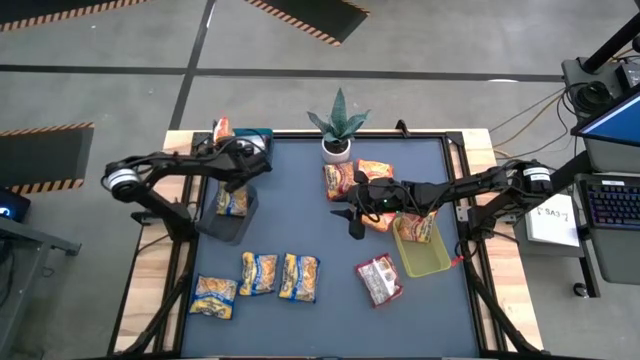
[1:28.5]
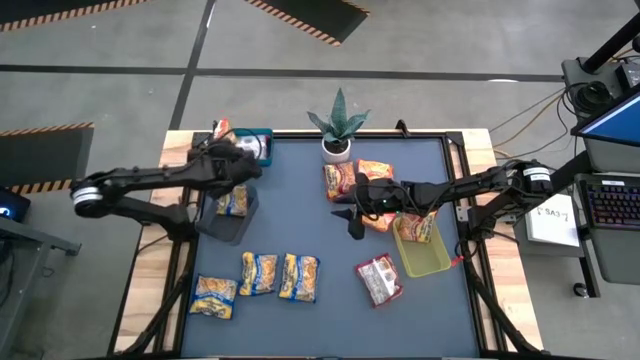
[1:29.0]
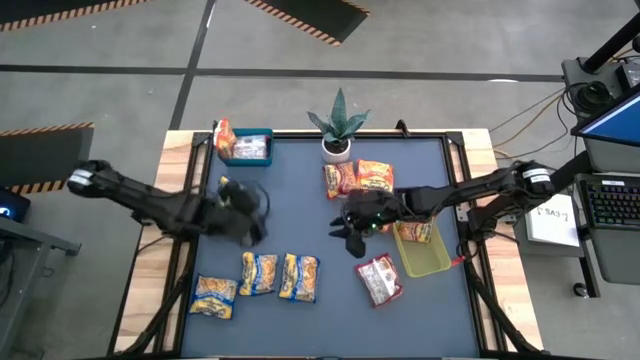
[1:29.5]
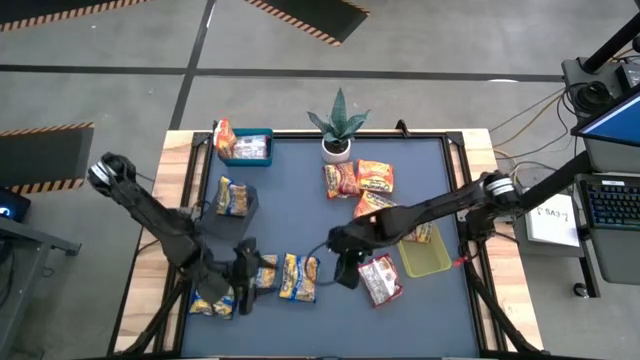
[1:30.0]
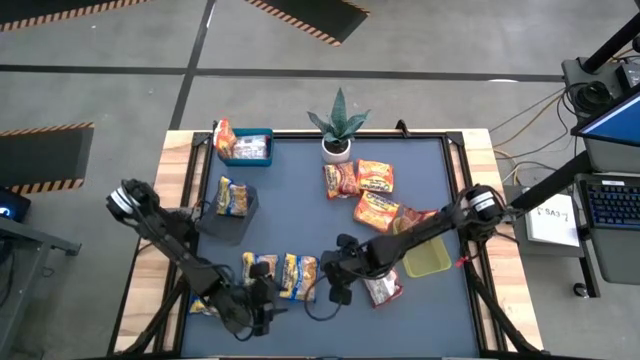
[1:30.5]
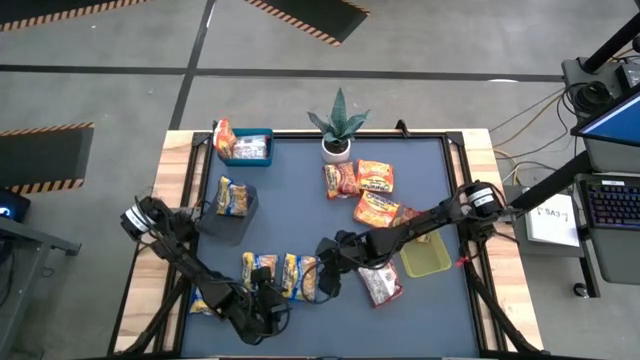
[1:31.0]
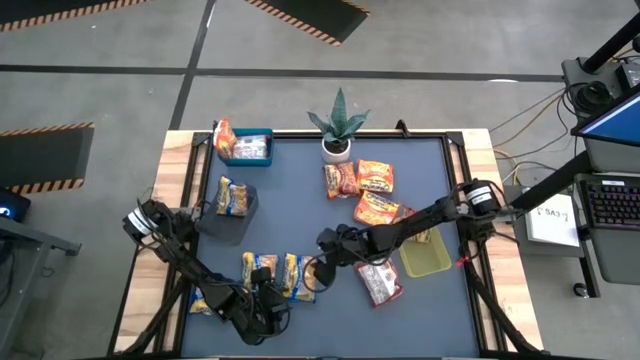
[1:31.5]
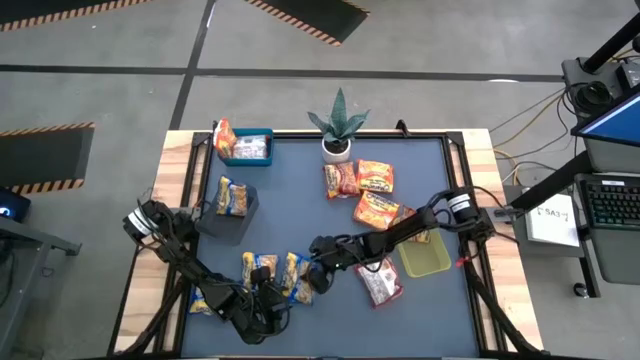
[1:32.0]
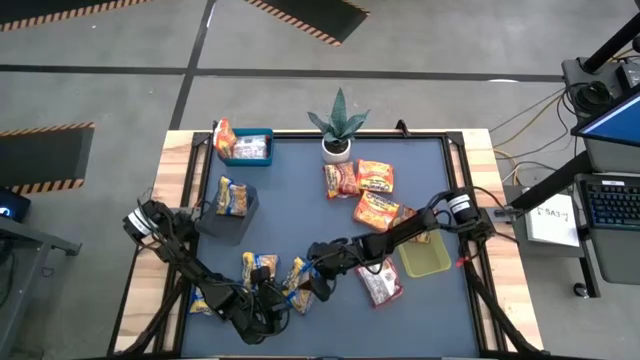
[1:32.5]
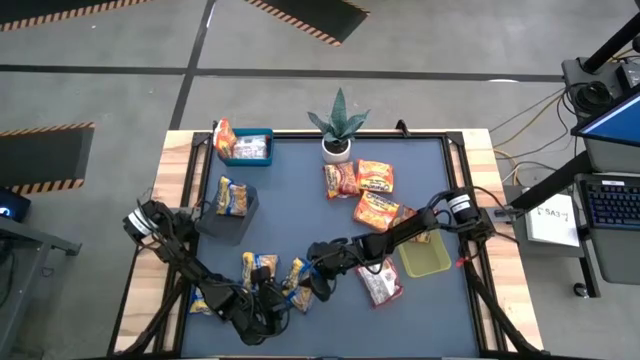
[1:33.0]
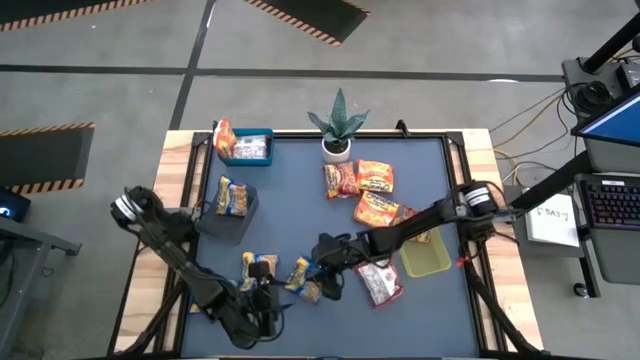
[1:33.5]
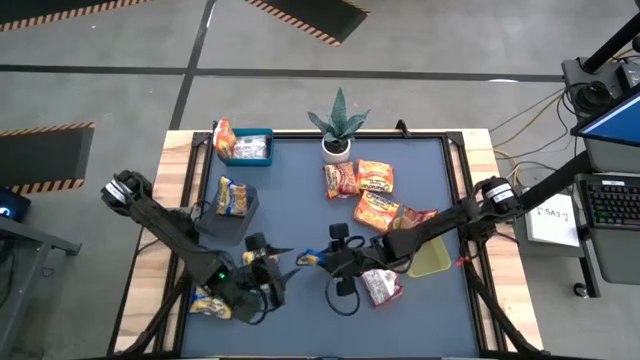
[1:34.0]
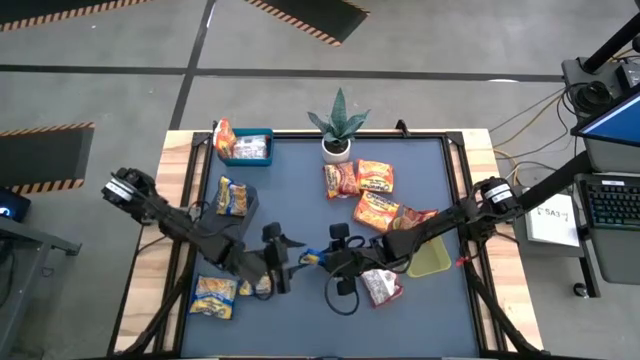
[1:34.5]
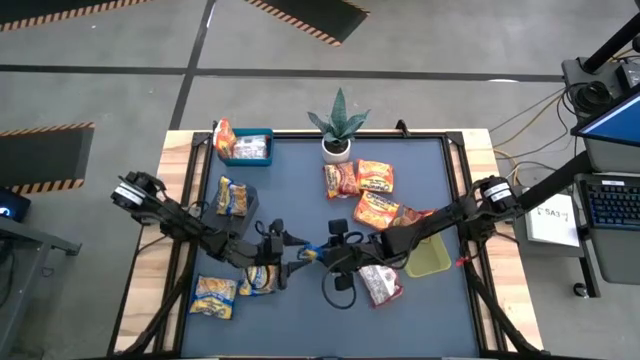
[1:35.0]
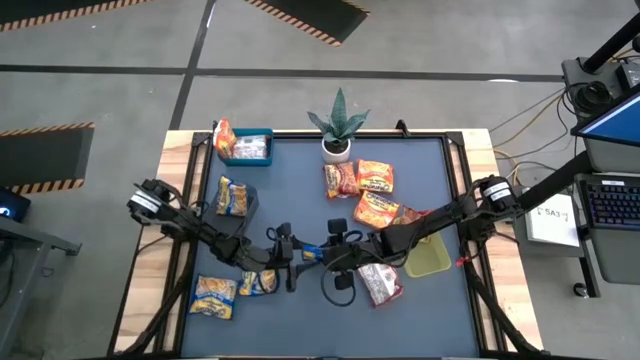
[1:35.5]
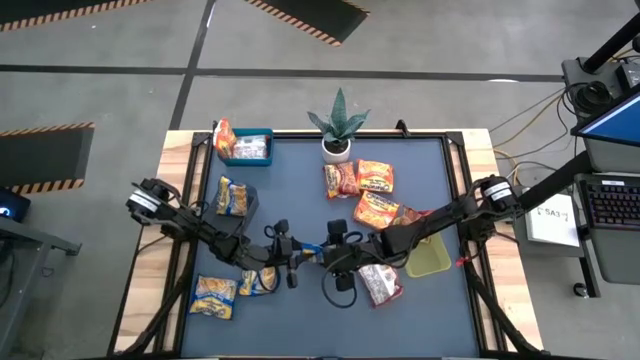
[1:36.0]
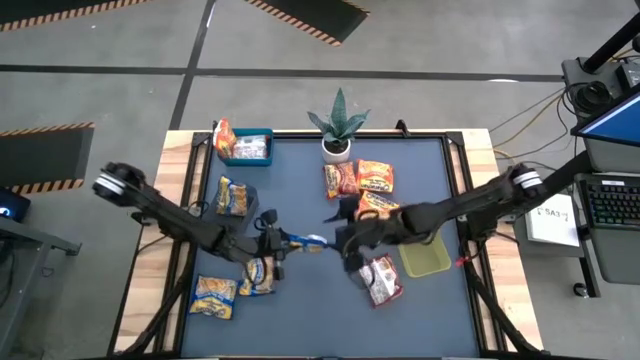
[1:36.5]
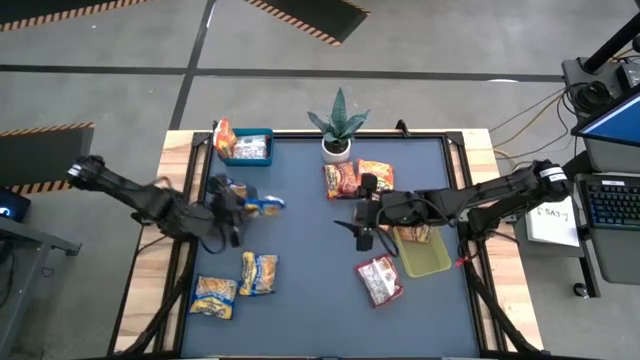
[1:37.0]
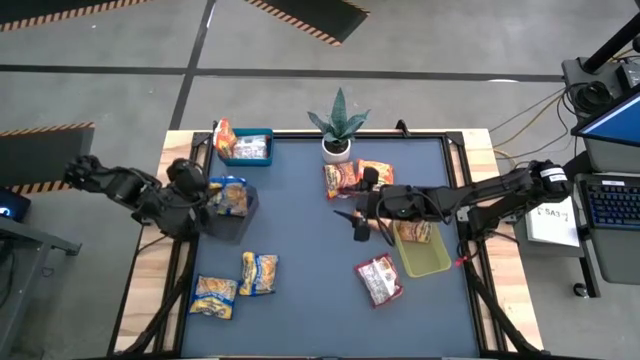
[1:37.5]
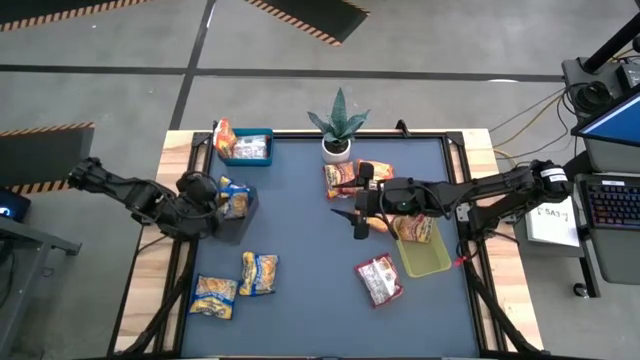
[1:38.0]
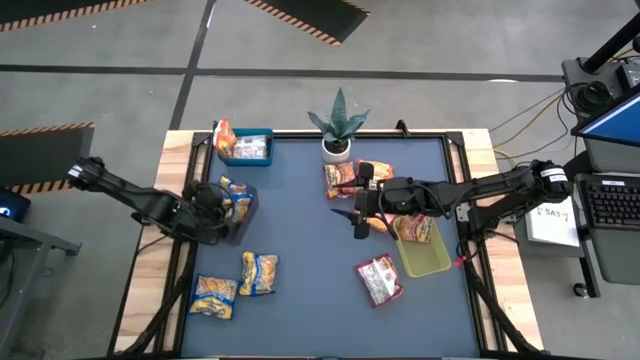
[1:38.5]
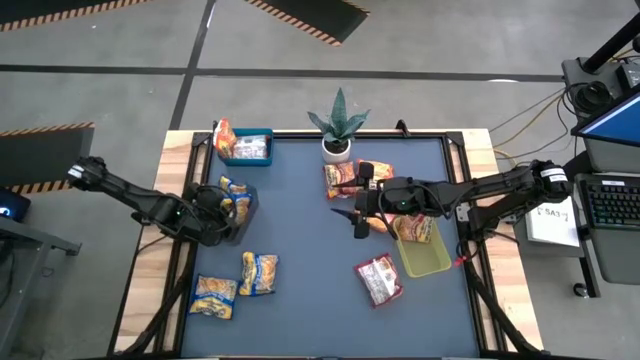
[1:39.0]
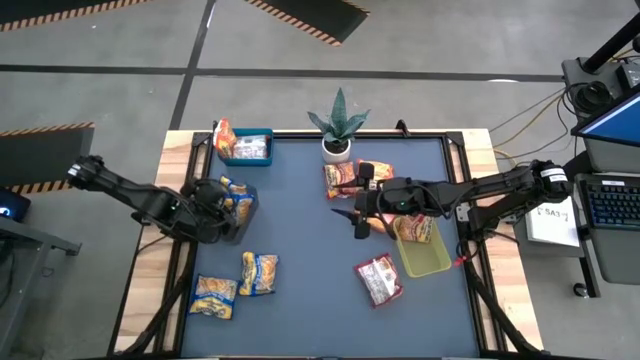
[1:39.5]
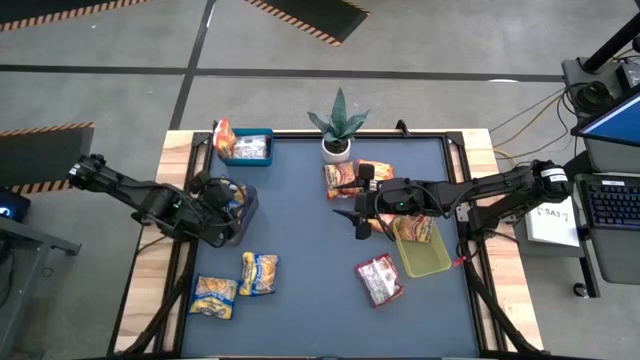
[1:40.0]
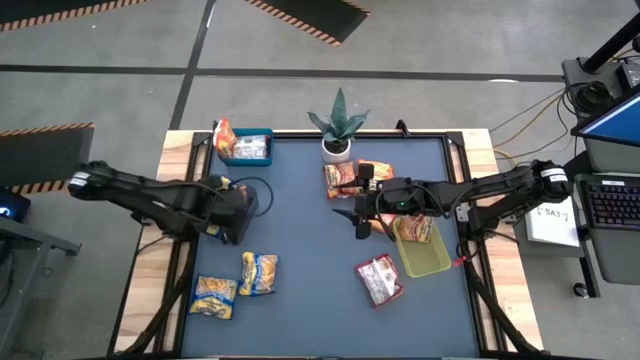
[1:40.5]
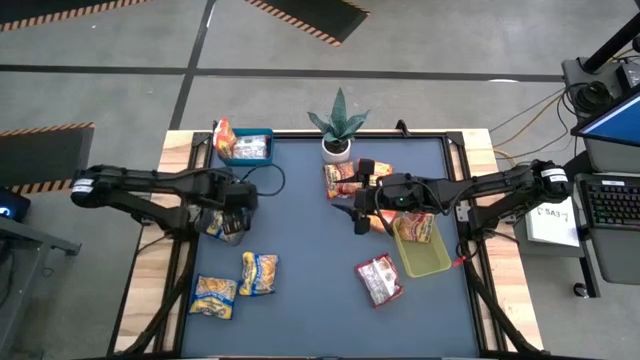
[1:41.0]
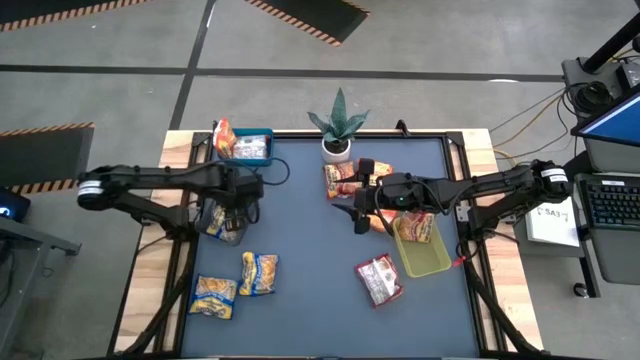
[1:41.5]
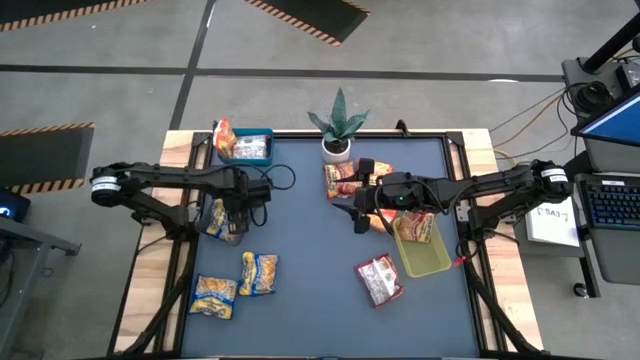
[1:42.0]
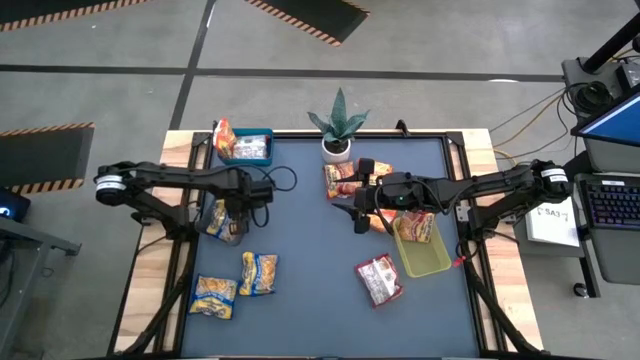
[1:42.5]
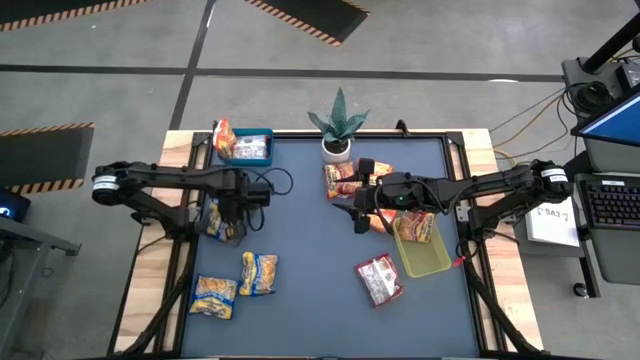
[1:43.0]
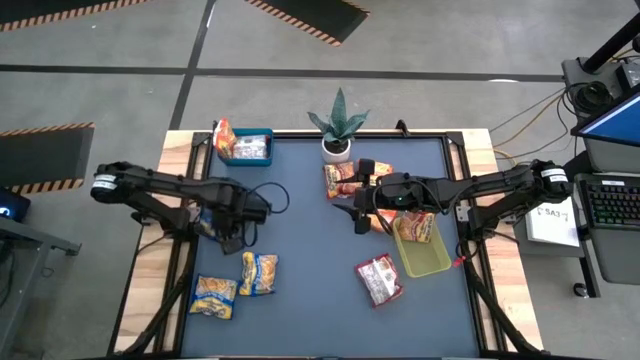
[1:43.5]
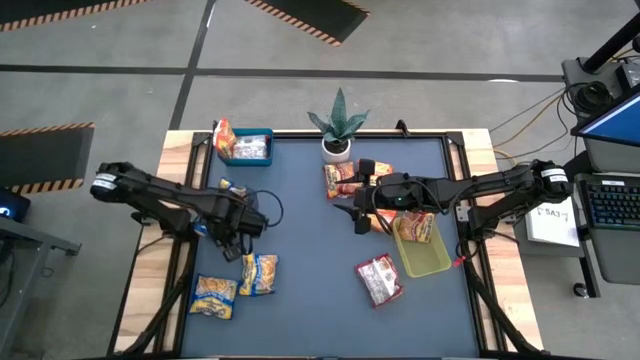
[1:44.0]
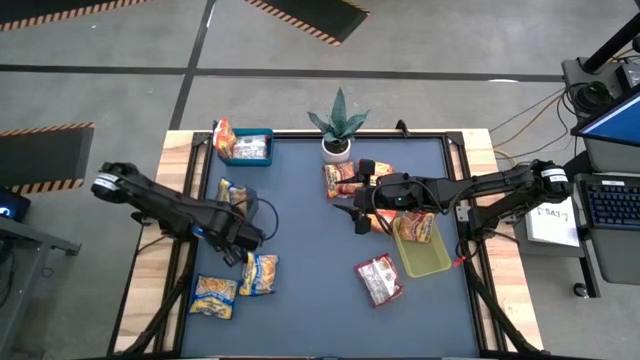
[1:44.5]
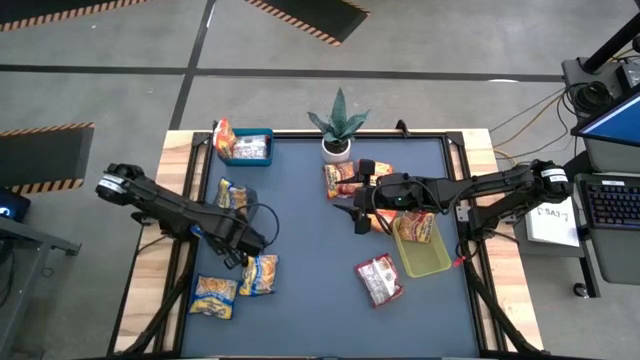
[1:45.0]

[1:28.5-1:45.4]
Task: Sort Maruchan noodles
Put the blue noodle pack into the black bin

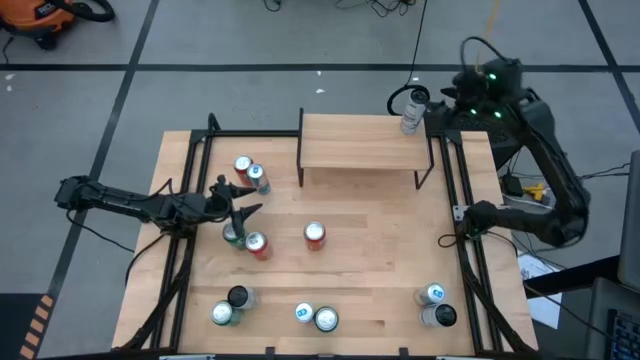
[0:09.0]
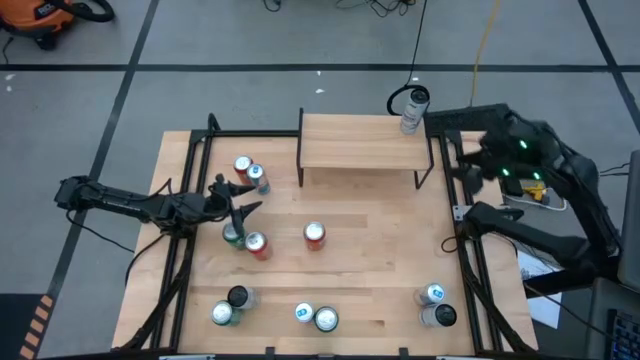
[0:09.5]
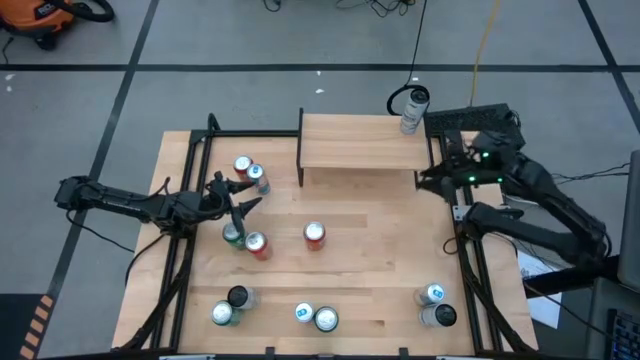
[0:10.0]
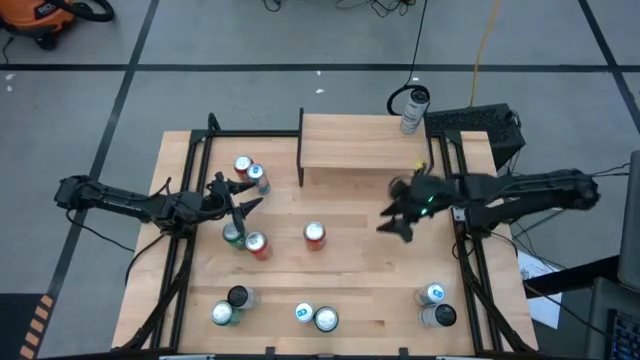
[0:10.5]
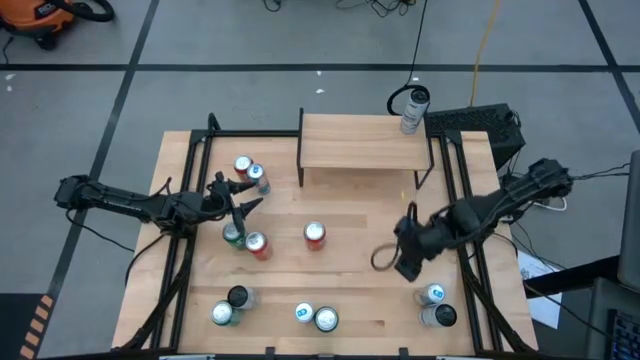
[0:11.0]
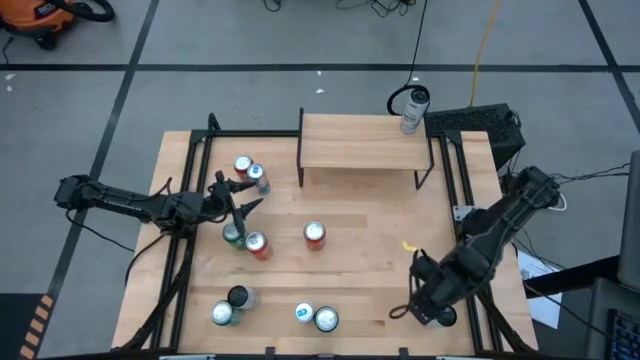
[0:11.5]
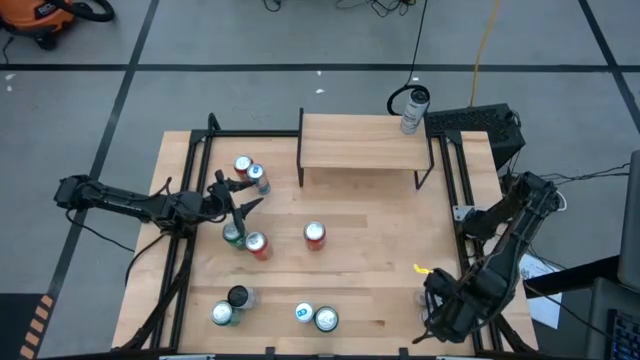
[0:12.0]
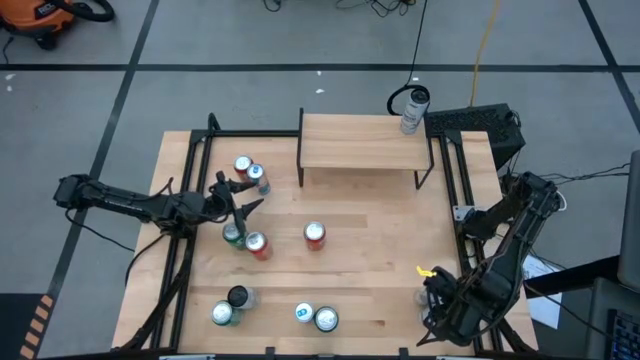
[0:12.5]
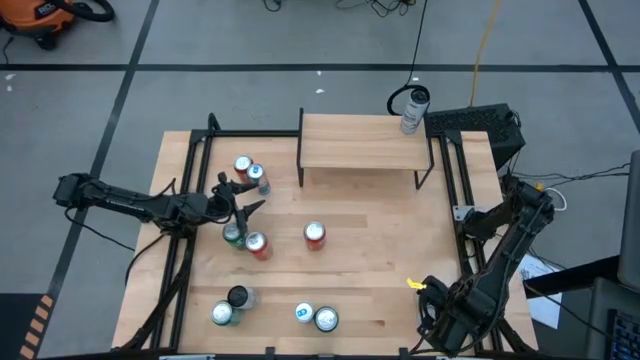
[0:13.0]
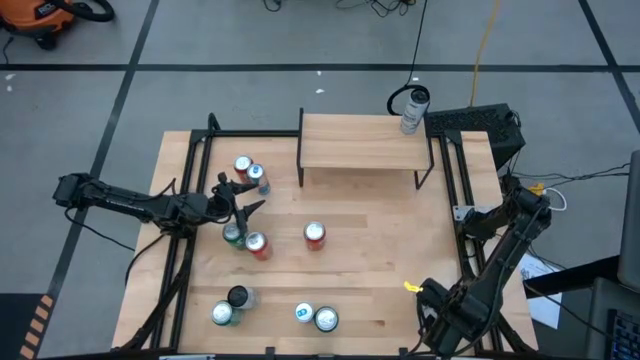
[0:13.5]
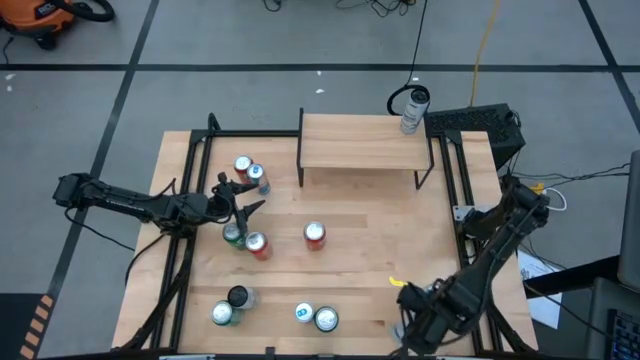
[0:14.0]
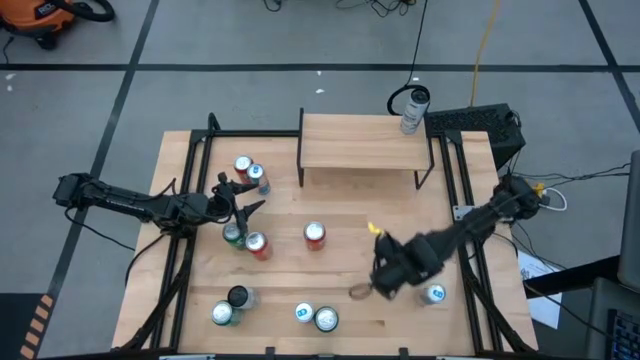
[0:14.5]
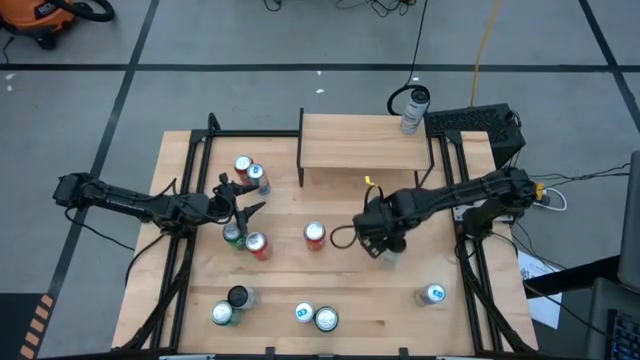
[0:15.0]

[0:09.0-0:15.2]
Task: Place canned beverage on shelf
Put the right white blue soda can on the shelf aligned with the other white blue soda can
